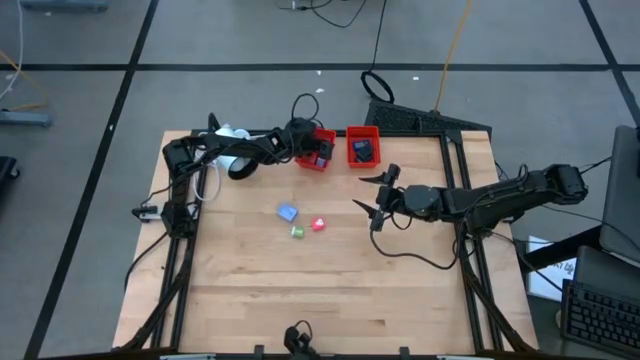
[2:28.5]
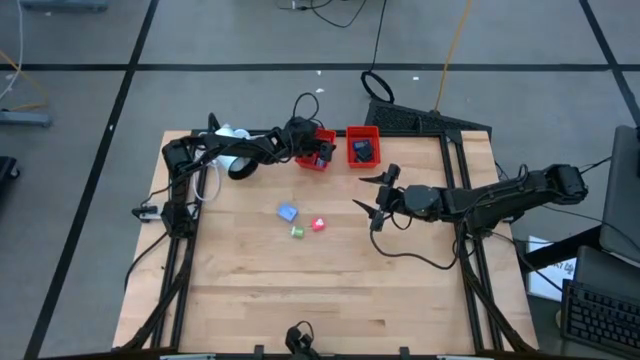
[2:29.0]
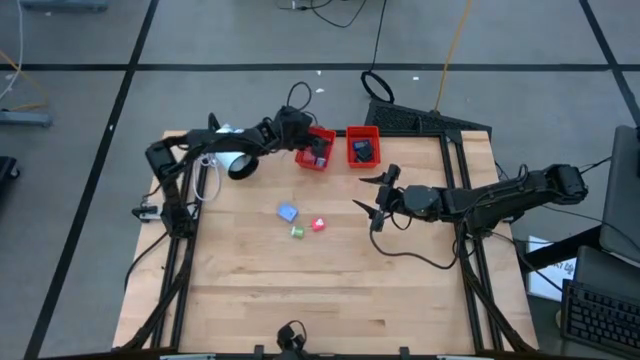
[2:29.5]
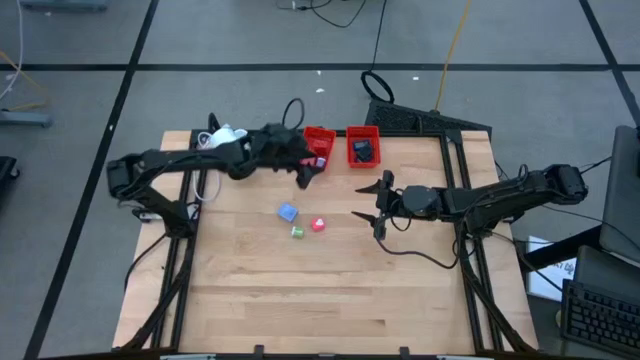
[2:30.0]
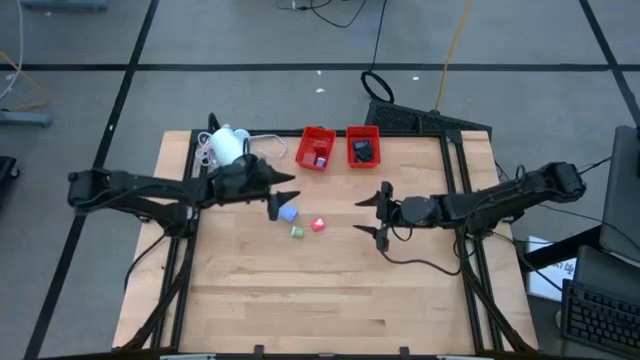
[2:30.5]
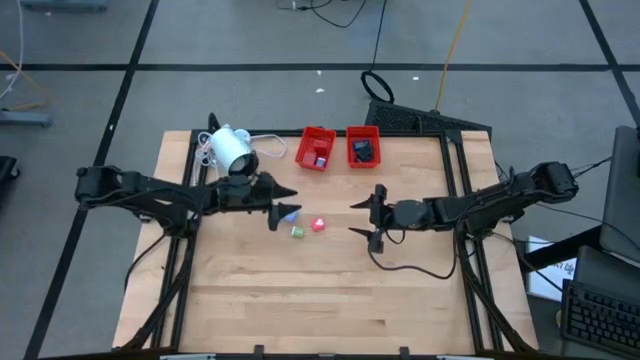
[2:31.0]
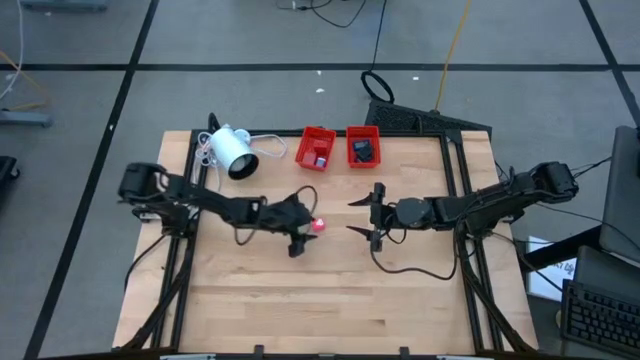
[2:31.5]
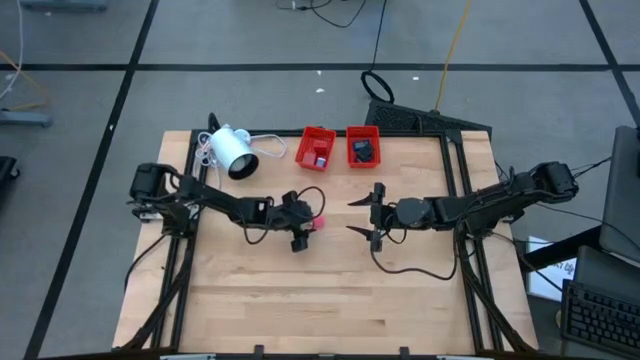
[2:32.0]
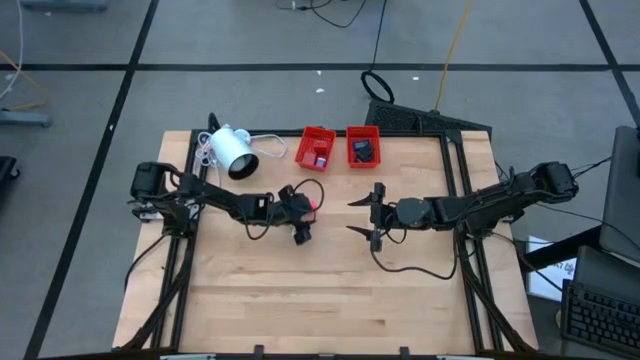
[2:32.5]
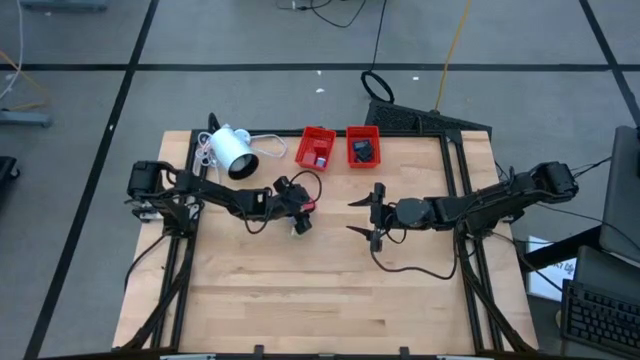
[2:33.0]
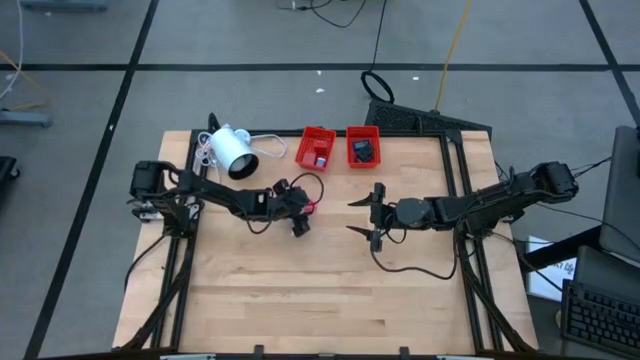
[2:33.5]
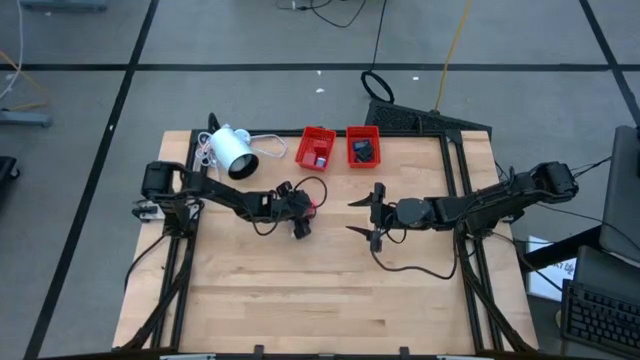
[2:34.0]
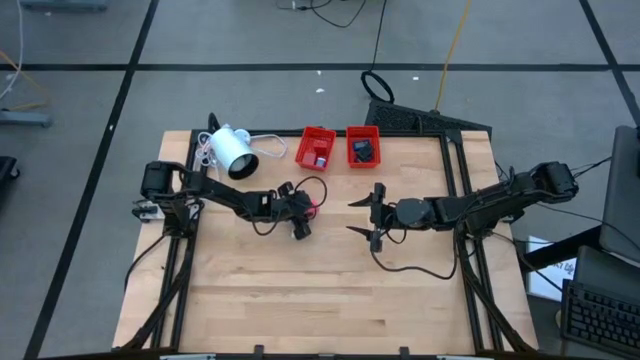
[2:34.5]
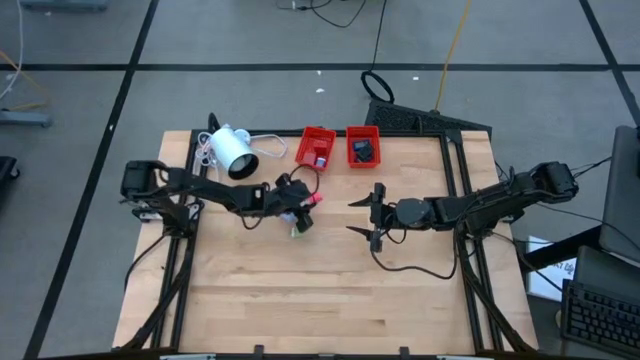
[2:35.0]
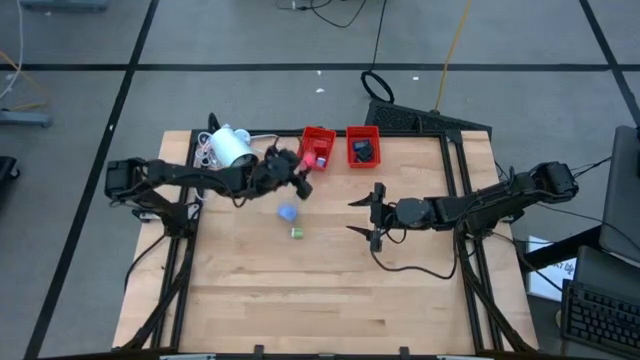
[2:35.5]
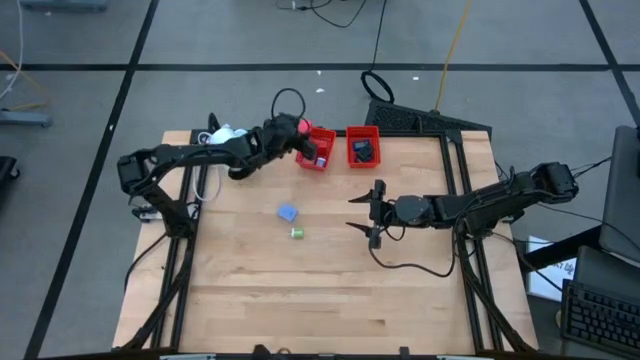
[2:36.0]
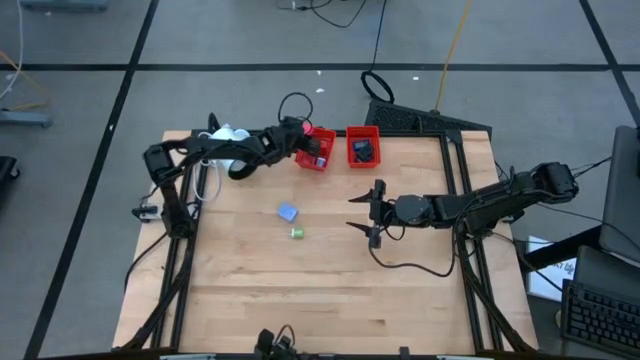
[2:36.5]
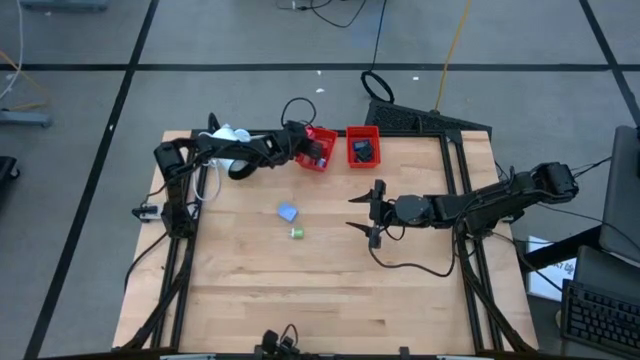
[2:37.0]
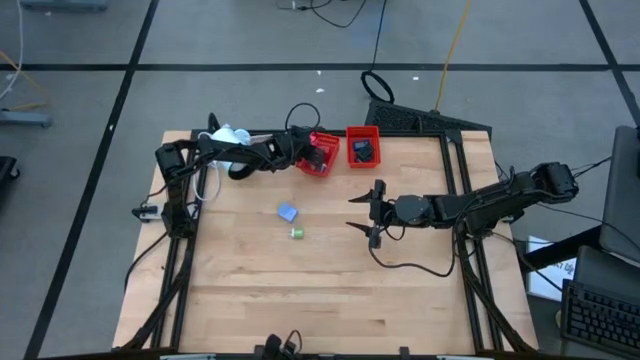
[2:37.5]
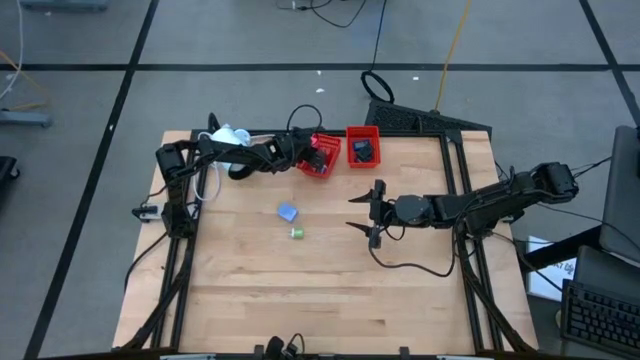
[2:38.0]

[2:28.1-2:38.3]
Task: Pick & Place Office items
Put the pink charger adapter into the left red bin

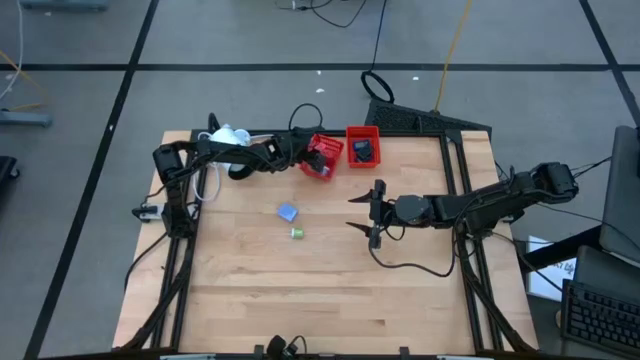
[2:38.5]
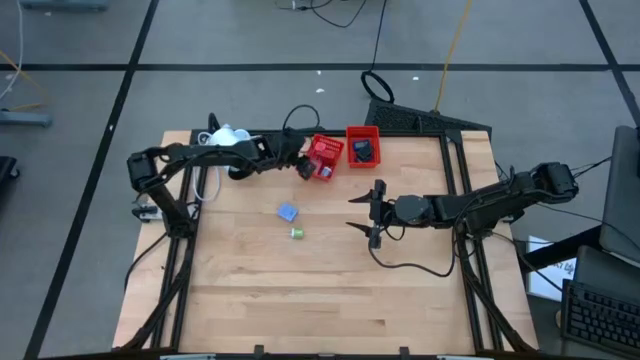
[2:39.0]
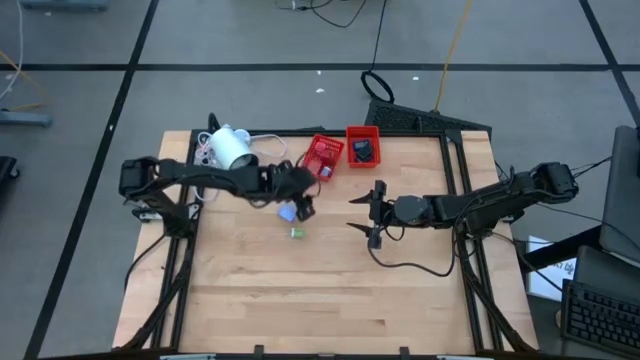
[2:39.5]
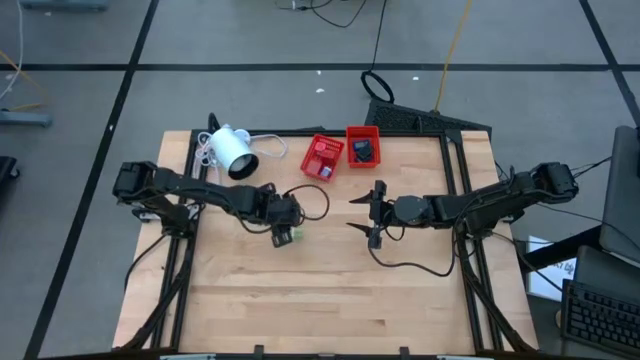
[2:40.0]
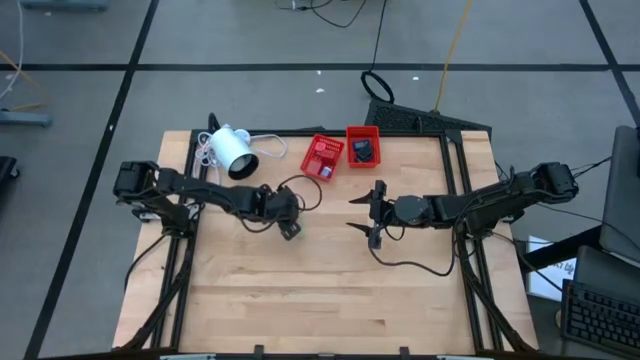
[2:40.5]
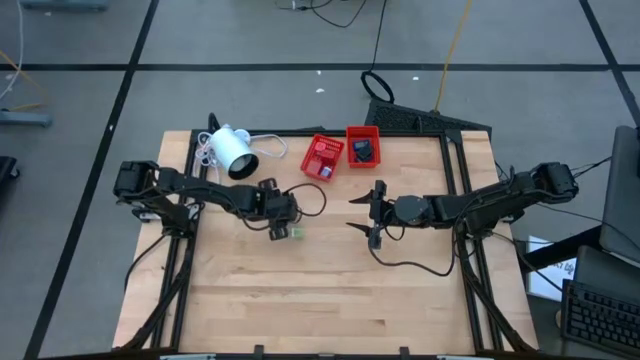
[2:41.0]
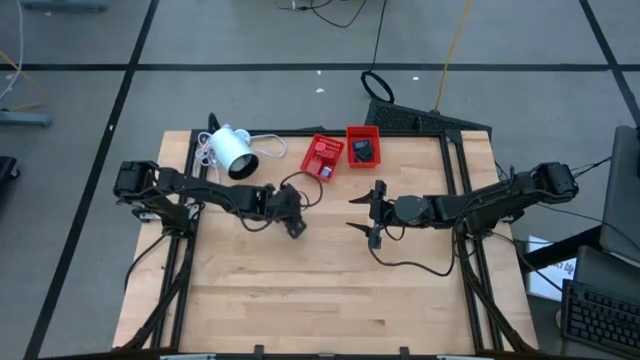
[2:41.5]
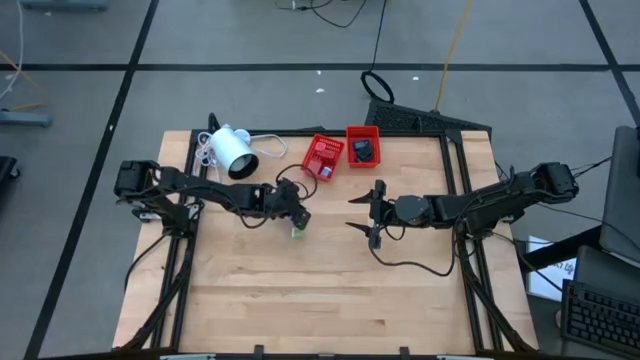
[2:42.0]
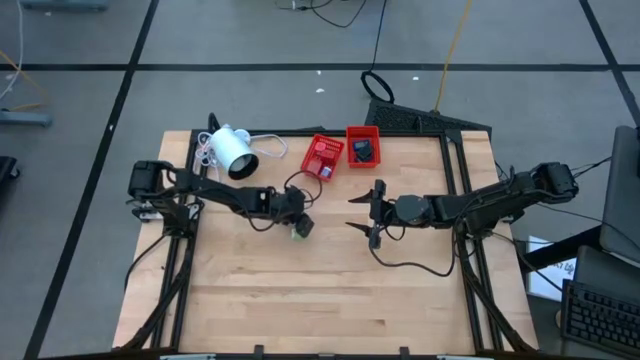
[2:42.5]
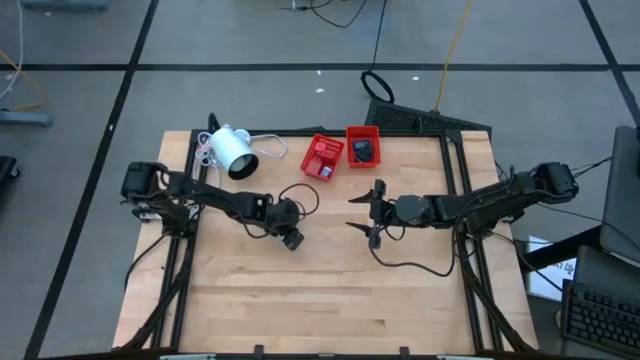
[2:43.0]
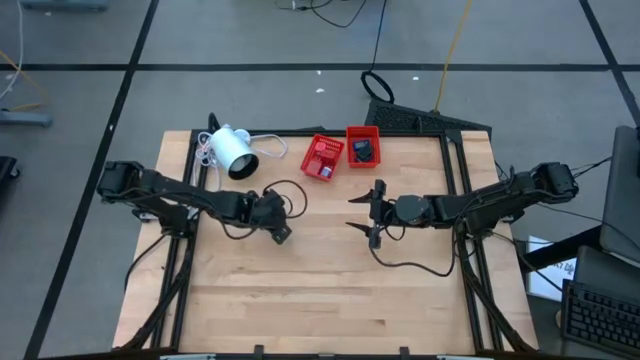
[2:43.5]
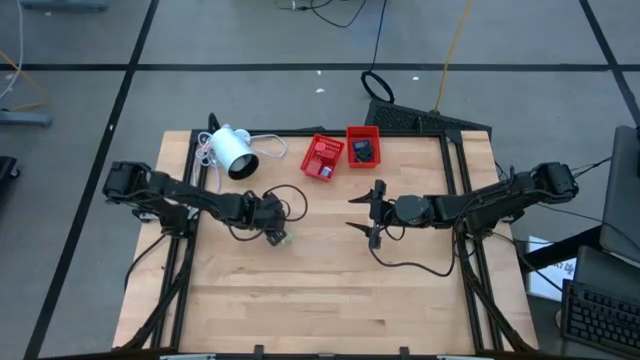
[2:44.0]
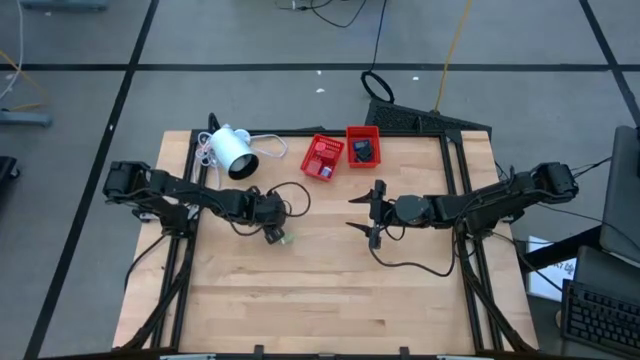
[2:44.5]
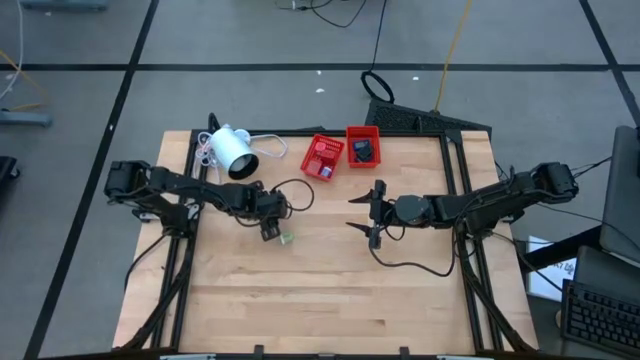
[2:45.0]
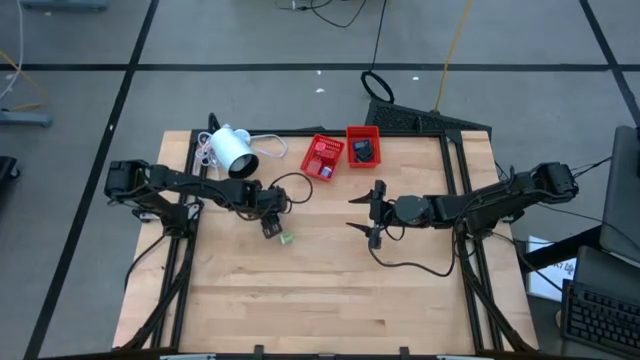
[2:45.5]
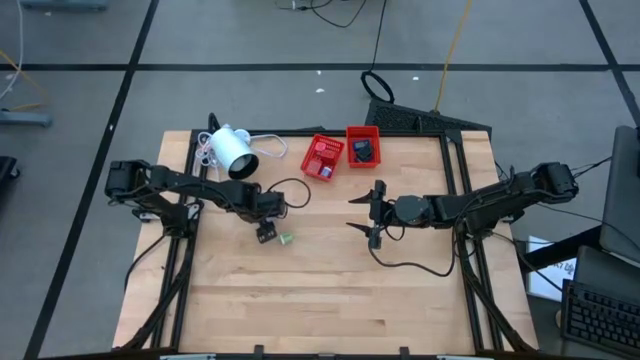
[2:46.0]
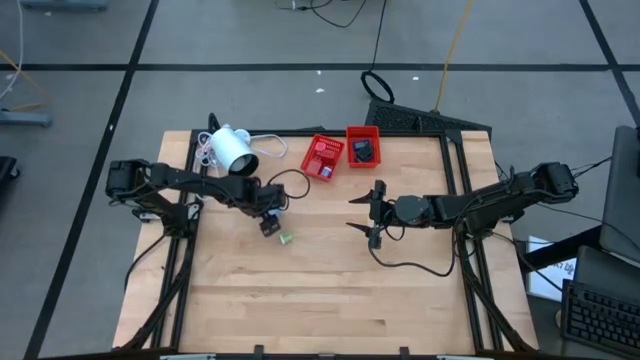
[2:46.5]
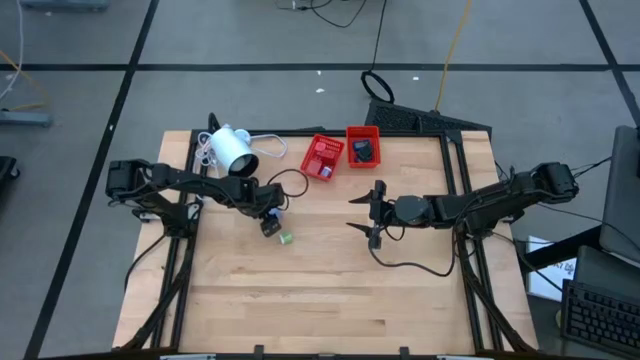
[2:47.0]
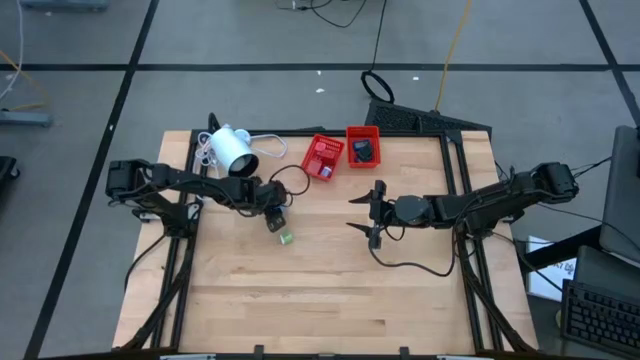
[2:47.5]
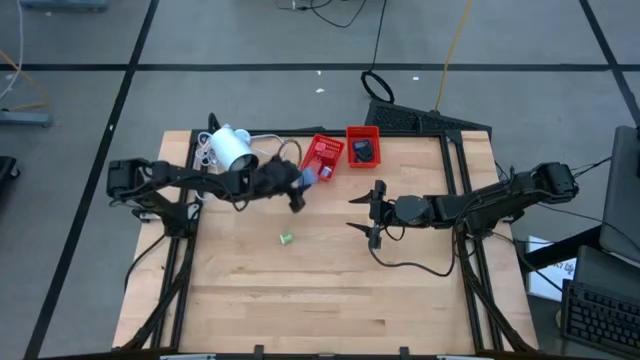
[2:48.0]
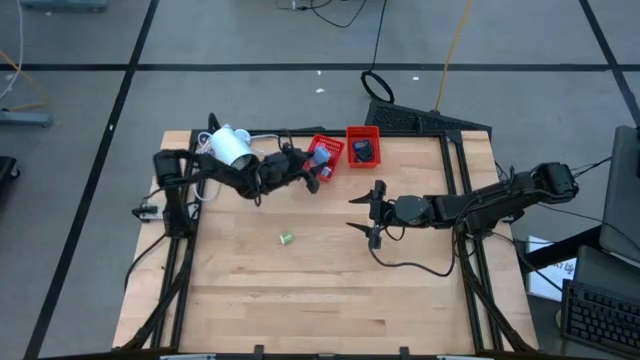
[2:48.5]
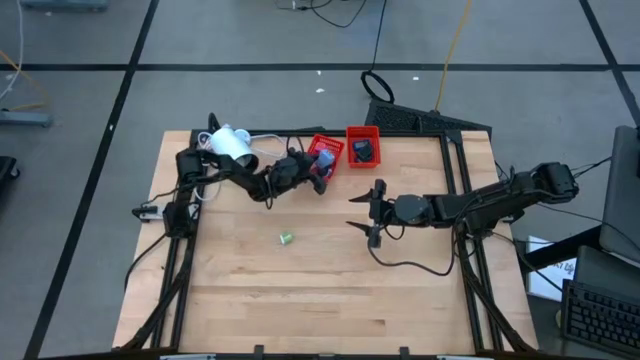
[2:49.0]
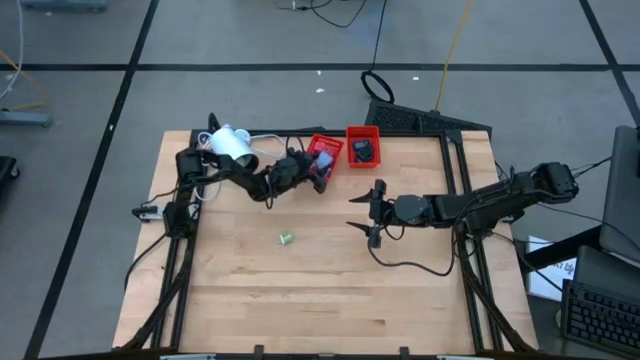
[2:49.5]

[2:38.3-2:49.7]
Put the blue charger adapter into the left red bin
